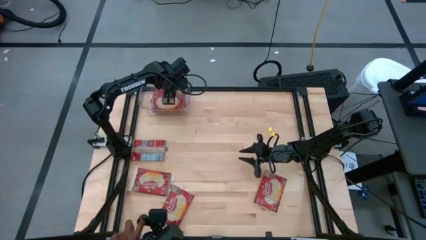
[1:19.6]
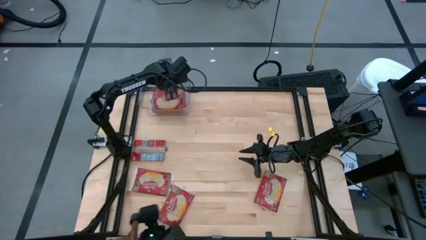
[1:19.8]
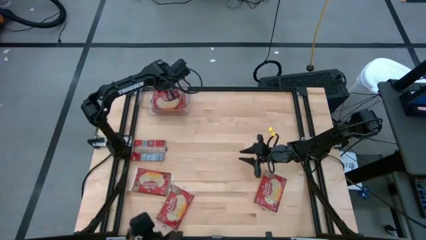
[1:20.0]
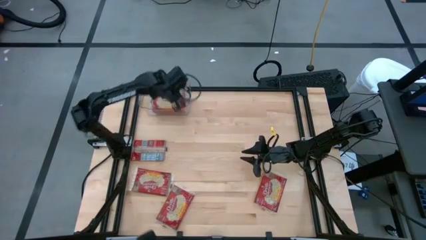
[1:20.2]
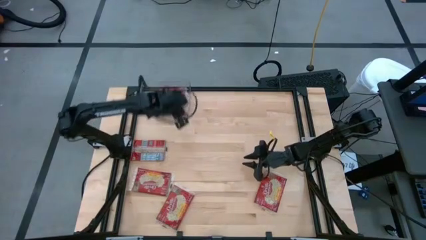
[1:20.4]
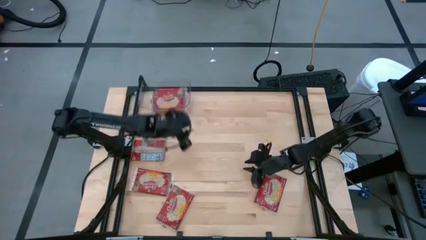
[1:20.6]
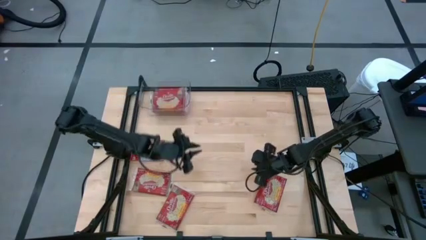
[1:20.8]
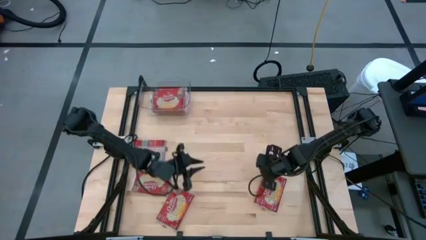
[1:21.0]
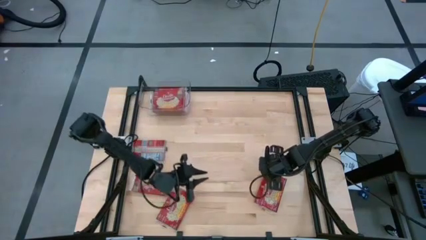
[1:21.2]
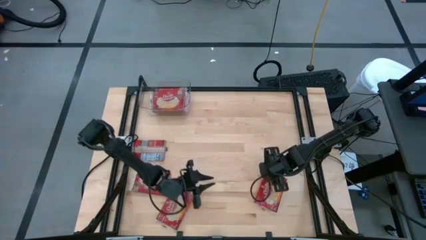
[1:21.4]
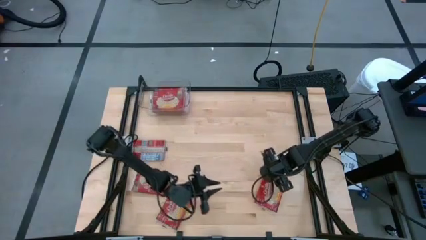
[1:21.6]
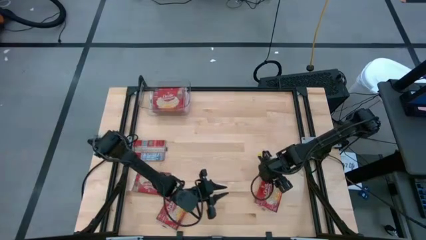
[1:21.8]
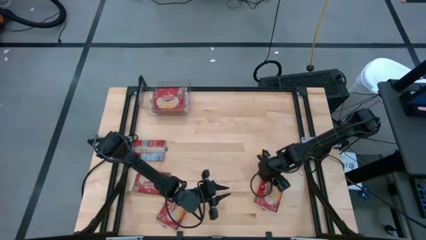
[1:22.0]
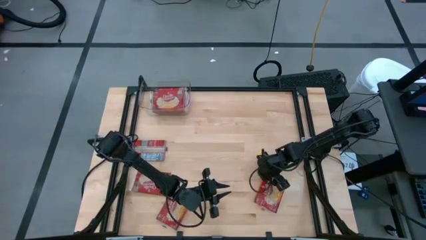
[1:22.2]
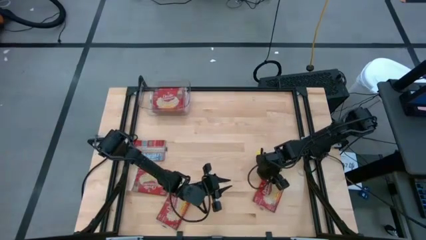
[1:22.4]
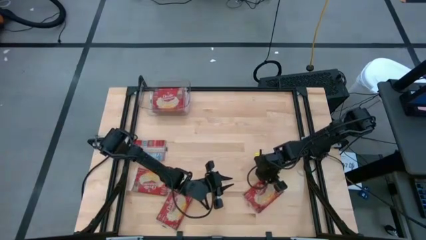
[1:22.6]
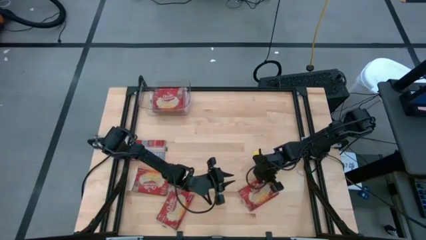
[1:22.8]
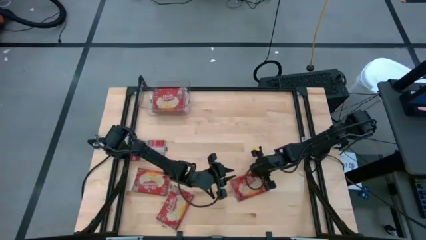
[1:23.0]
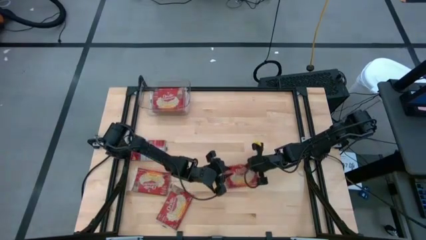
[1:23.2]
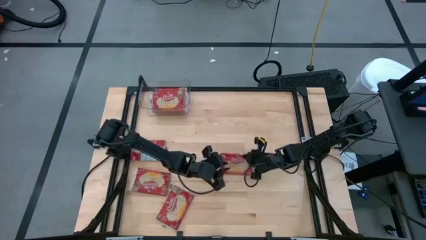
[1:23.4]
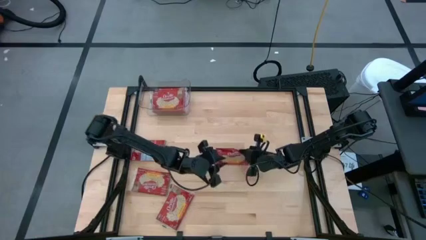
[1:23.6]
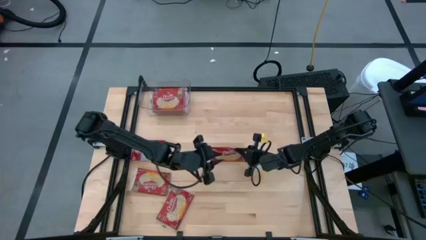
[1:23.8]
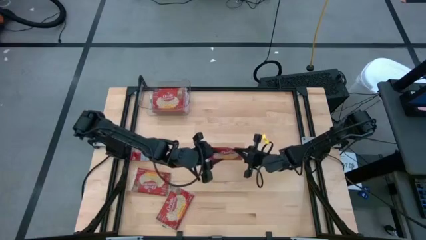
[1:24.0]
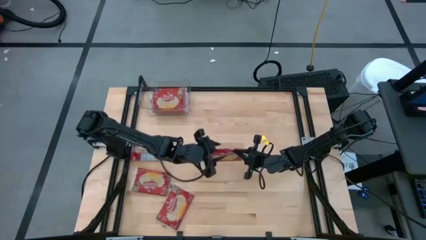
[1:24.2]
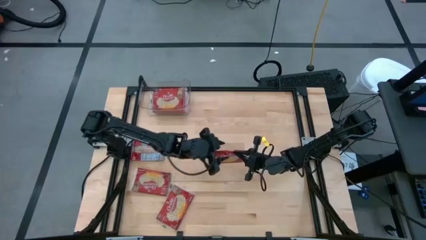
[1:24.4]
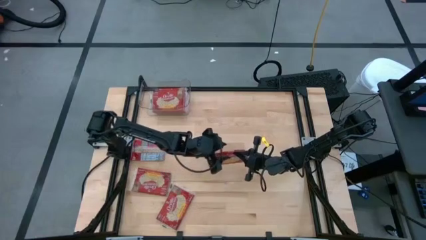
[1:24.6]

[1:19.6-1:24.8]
Task: Sort popcorn bags into baskets
Put the red popcorn bag into the transparent bin

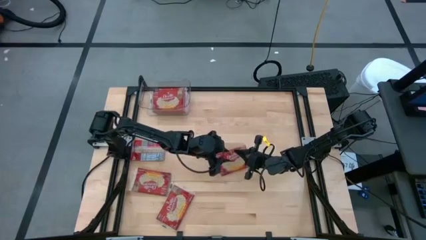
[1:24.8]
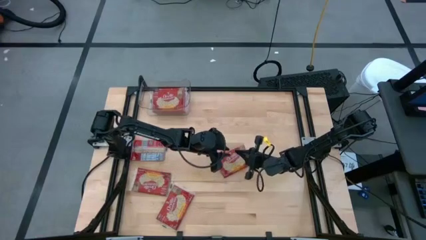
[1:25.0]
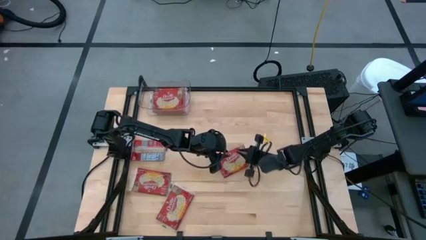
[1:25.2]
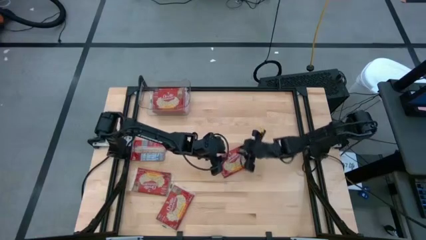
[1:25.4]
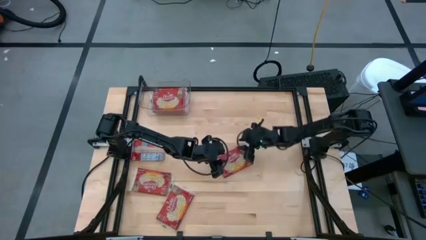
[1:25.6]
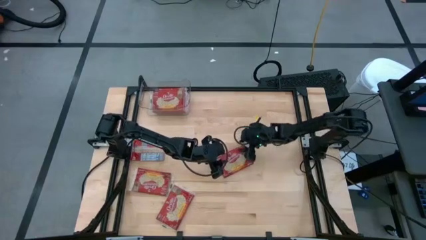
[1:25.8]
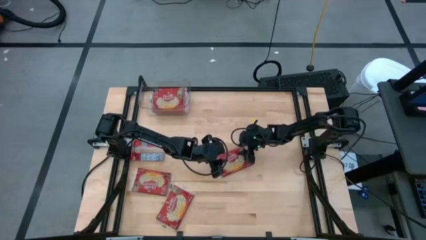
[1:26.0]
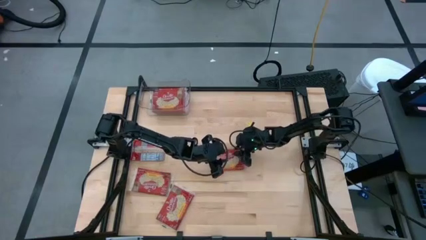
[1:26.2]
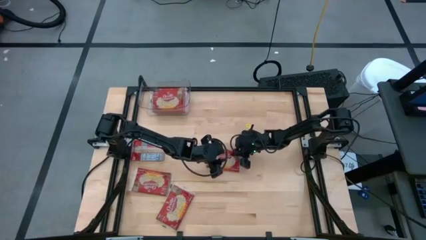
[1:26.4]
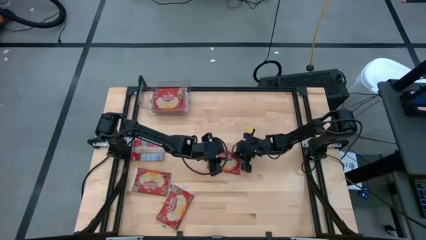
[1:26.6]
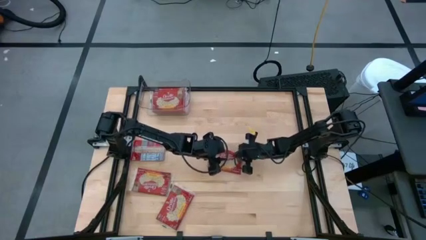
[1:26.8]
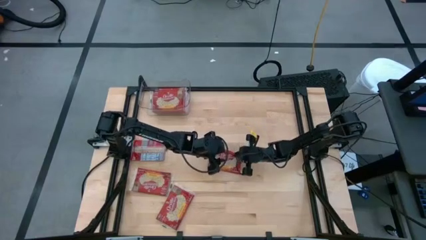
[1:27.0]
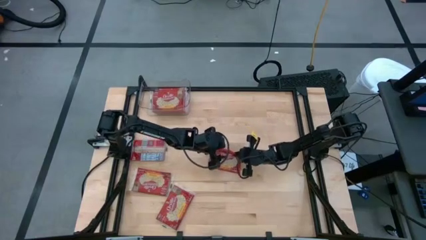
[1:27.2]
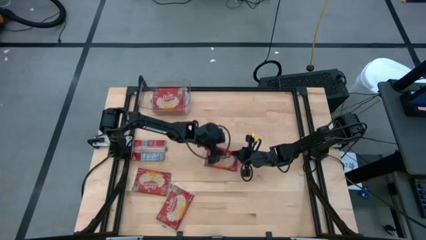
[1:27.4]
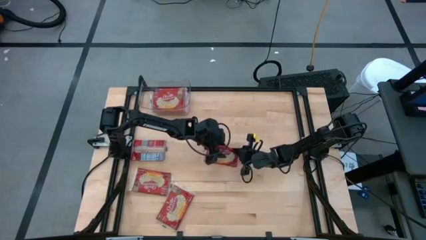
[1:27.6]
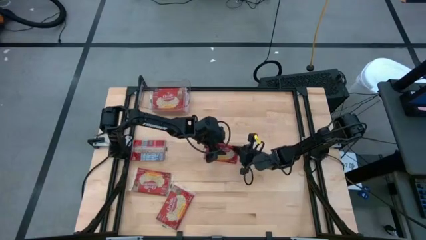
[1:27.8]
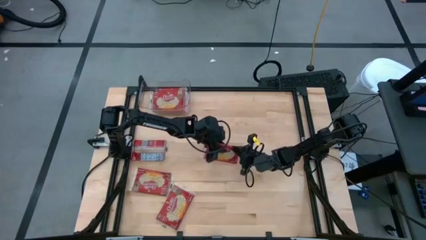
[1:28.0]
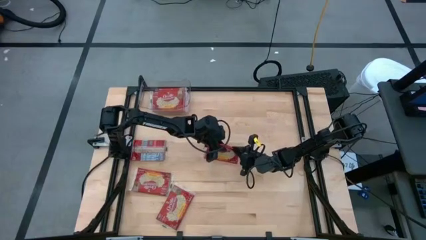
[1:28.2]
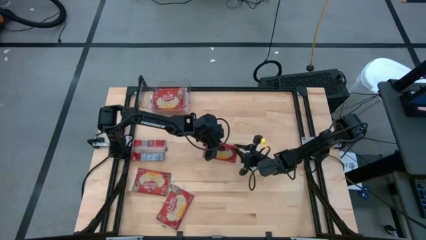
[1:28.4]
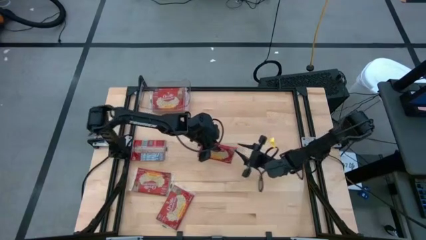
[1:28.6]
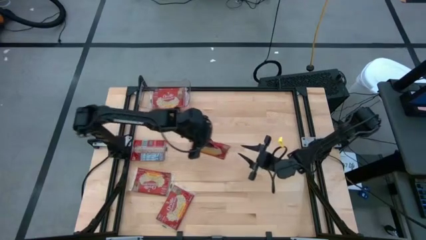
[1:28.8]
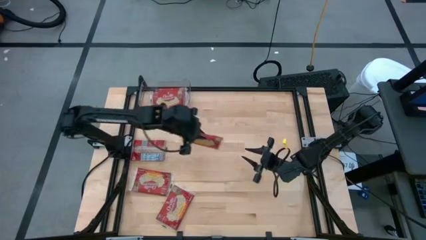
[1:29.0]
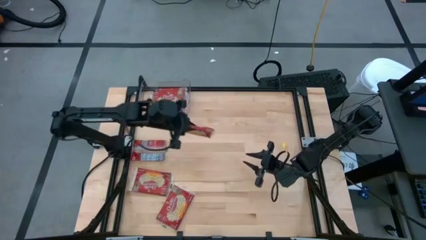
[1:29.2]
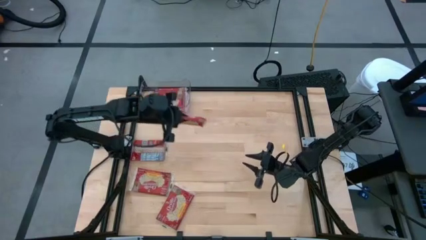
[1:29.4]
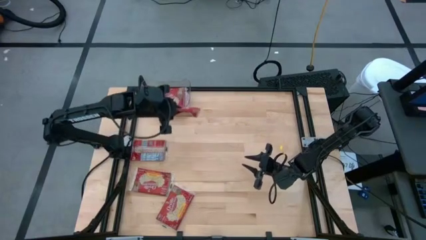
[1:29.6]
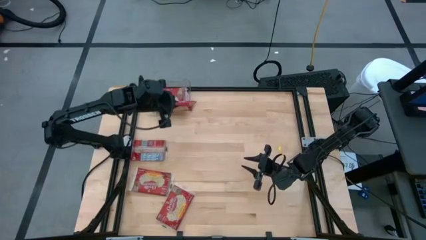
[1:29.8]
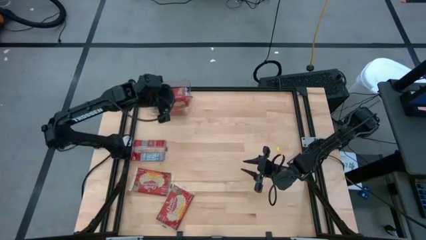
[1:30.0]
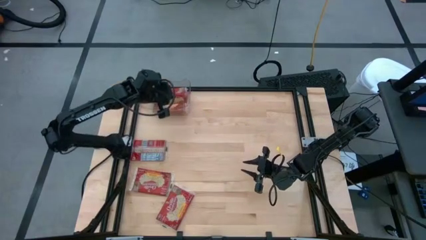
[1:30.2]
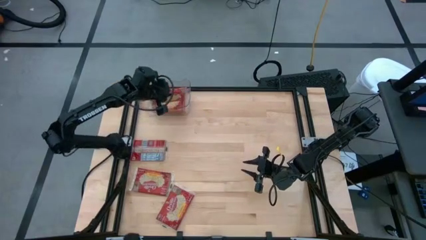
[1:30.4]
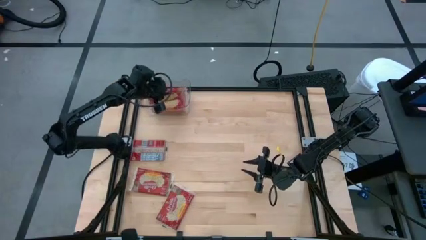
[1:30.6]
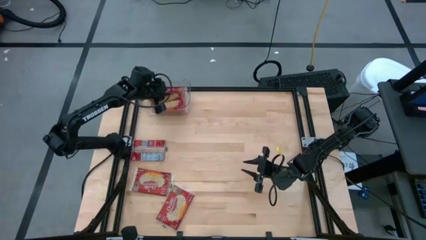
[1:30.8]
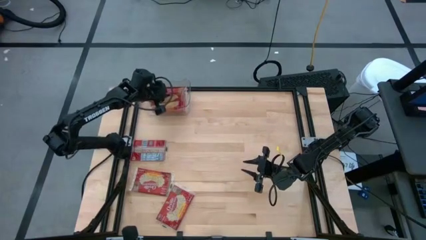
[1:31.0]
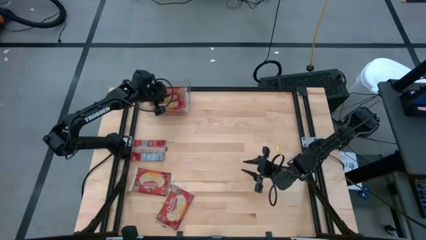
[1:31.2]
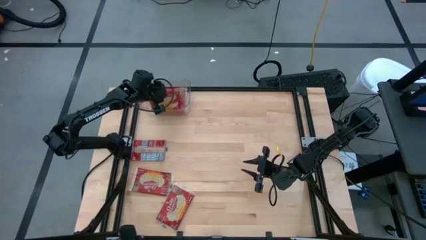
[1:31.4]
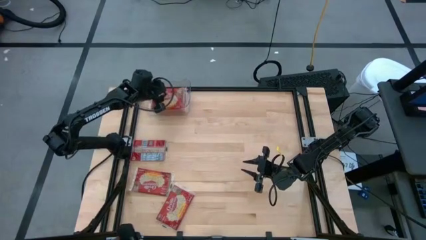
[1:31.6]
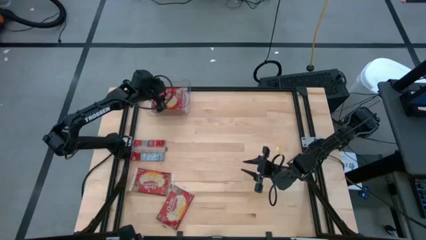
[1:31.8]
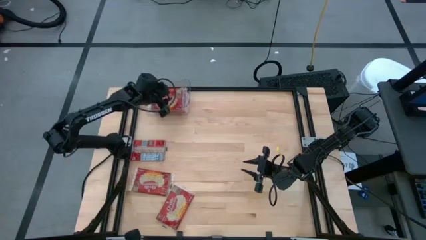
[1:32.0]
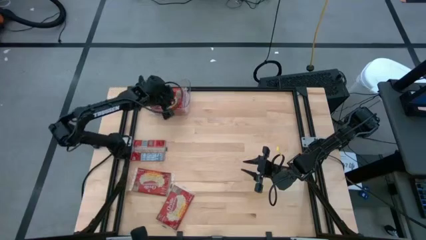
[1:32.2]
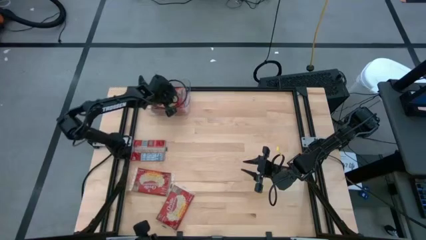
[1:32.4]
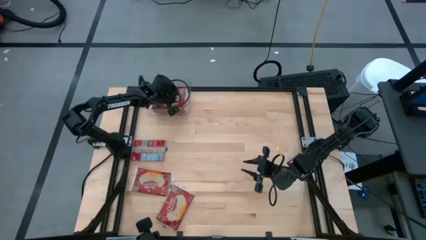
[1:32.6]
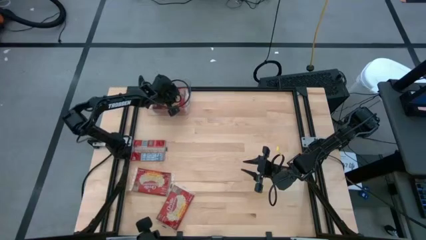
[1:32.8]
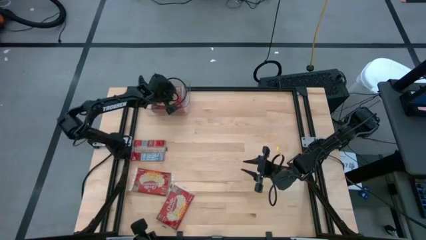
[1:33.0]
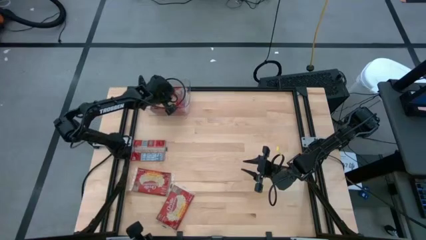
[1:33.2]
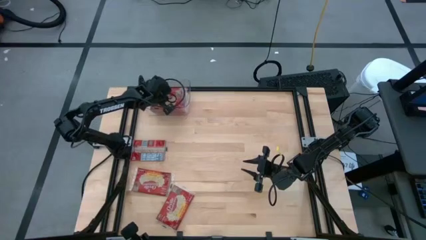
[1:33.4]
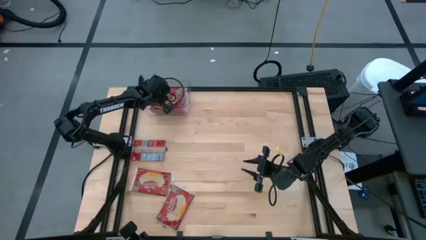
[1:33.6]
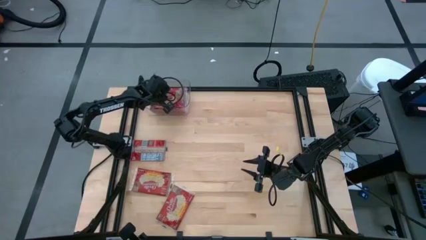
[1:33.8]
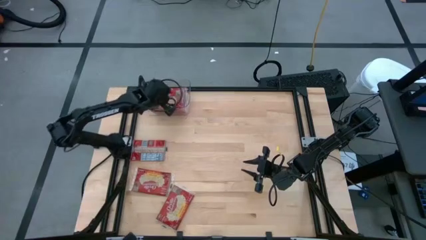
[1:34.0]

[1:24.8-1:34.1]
Put the red popcorn bag into the transparent bin
